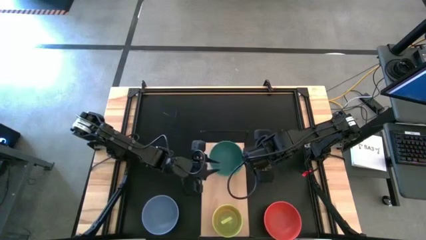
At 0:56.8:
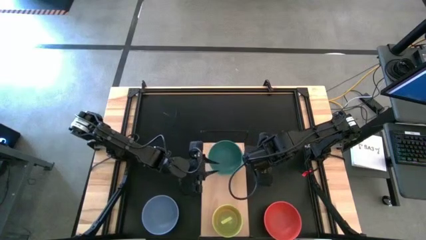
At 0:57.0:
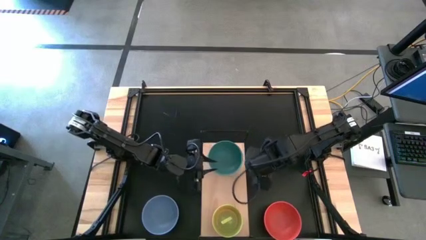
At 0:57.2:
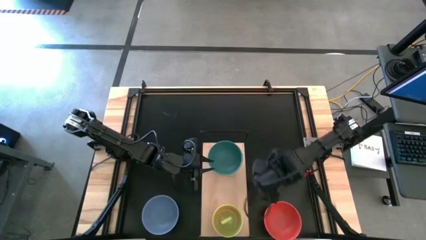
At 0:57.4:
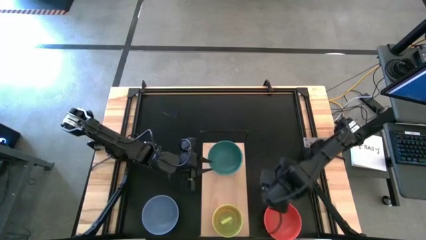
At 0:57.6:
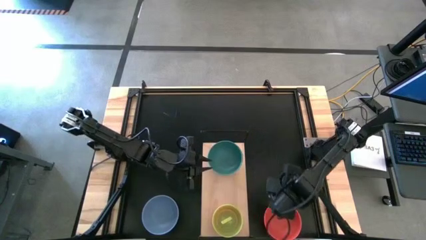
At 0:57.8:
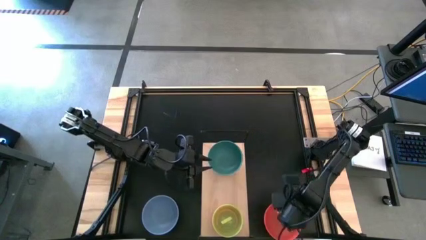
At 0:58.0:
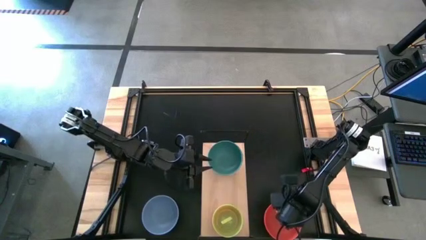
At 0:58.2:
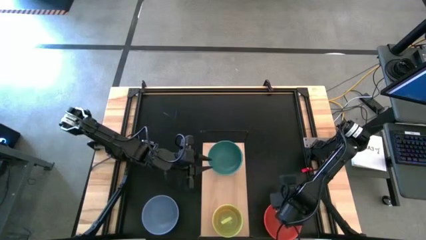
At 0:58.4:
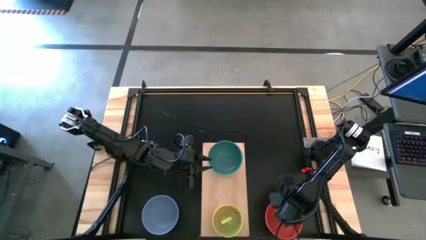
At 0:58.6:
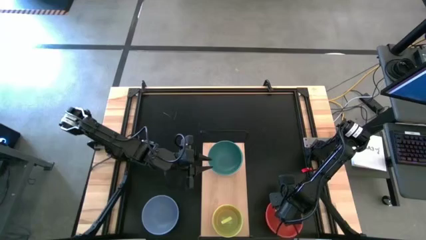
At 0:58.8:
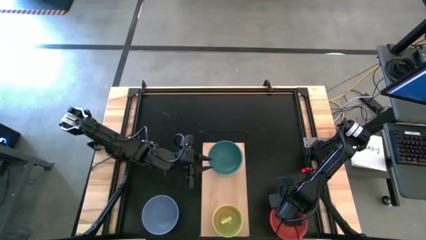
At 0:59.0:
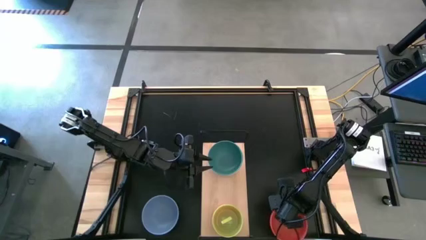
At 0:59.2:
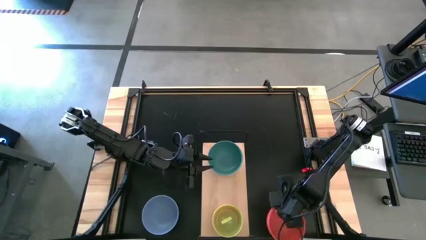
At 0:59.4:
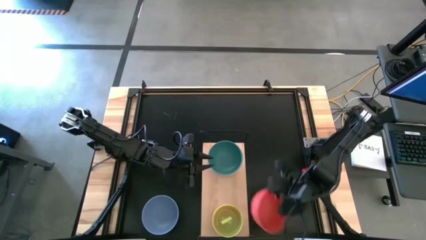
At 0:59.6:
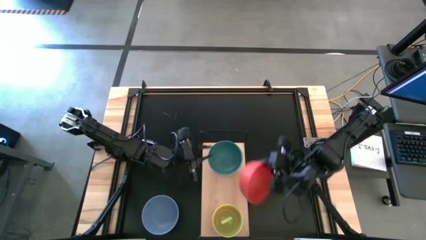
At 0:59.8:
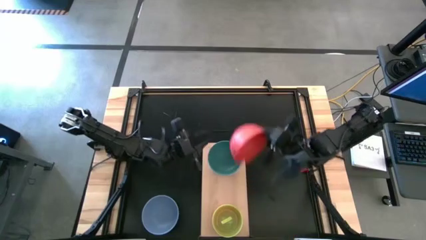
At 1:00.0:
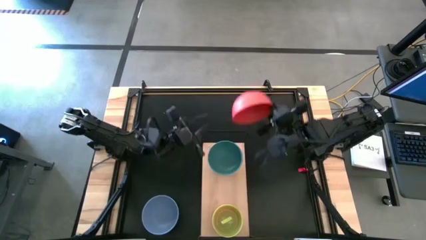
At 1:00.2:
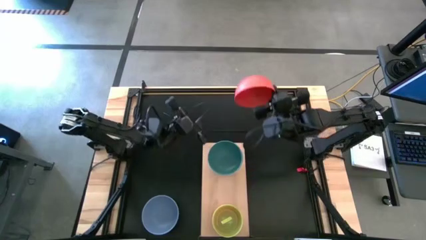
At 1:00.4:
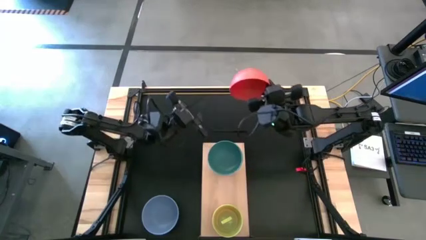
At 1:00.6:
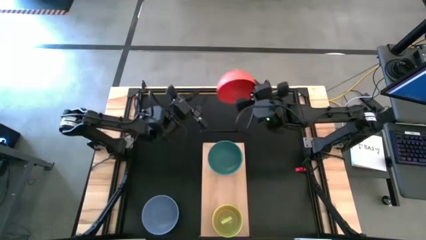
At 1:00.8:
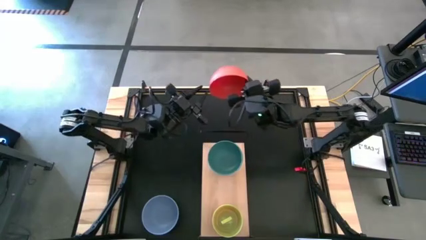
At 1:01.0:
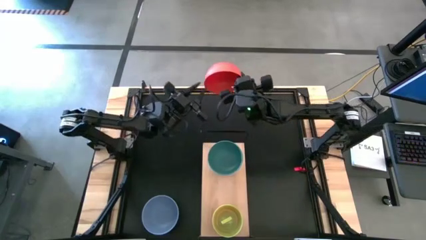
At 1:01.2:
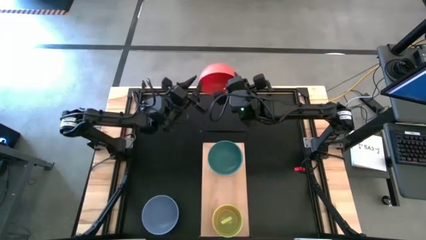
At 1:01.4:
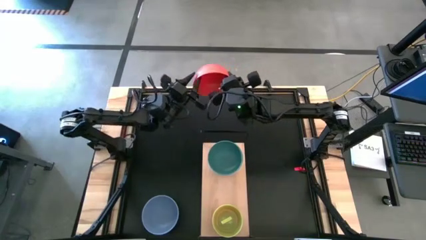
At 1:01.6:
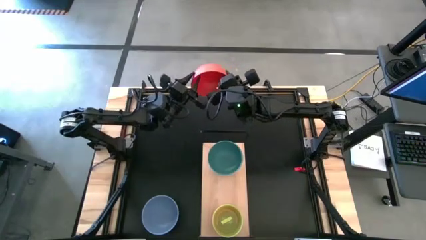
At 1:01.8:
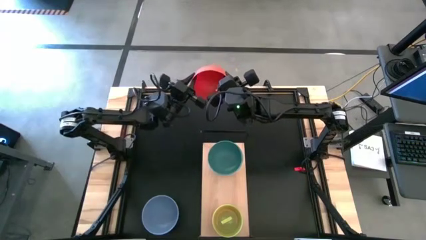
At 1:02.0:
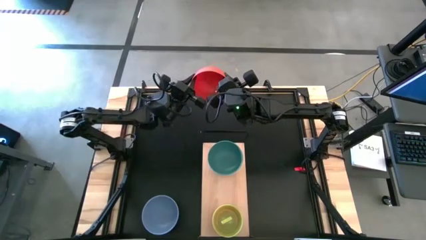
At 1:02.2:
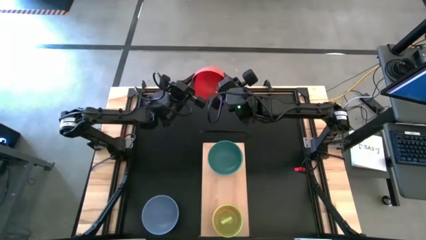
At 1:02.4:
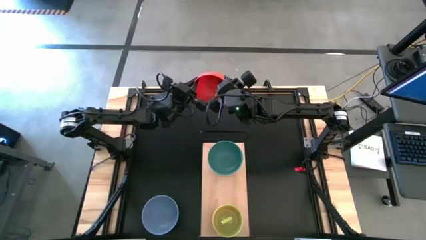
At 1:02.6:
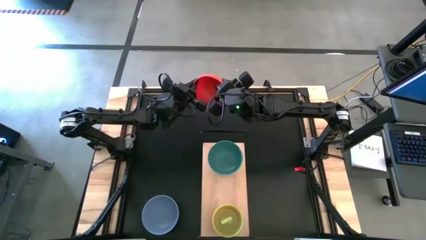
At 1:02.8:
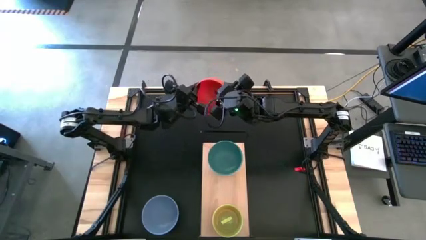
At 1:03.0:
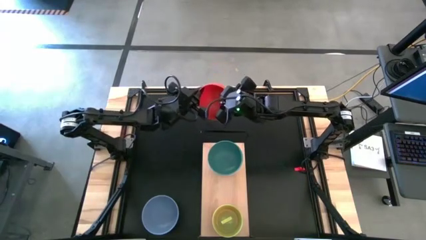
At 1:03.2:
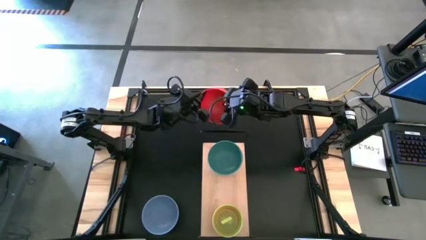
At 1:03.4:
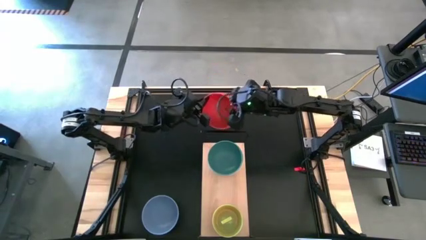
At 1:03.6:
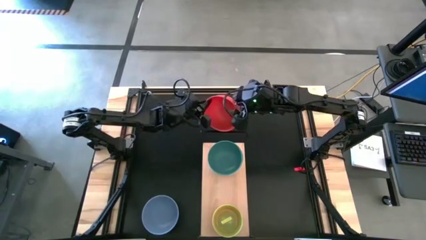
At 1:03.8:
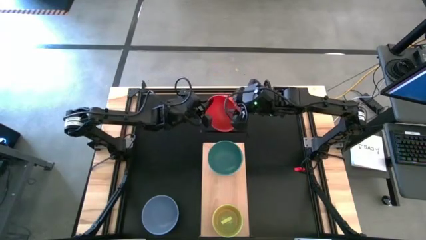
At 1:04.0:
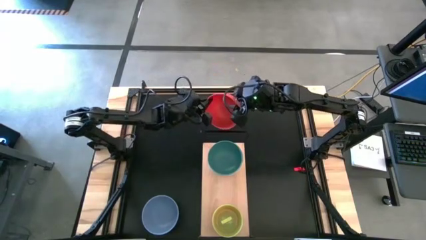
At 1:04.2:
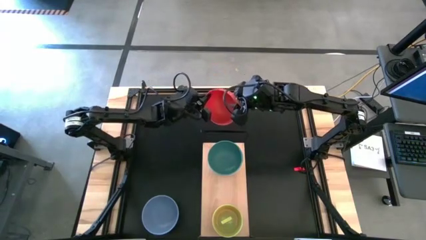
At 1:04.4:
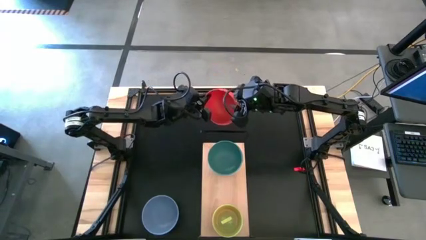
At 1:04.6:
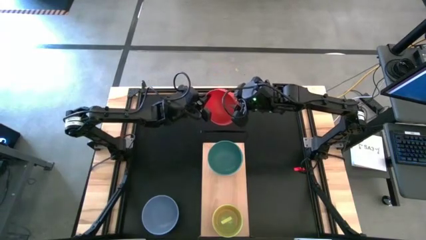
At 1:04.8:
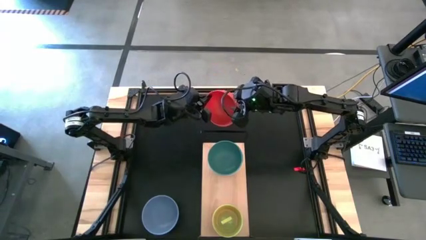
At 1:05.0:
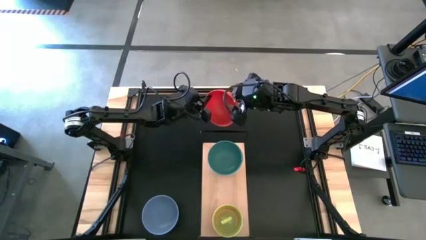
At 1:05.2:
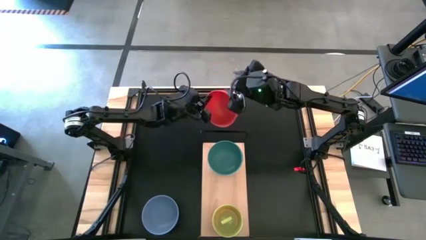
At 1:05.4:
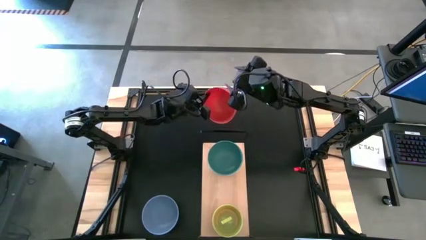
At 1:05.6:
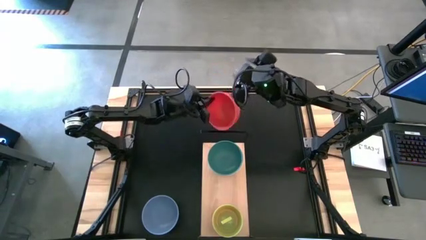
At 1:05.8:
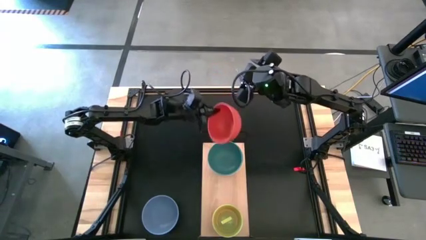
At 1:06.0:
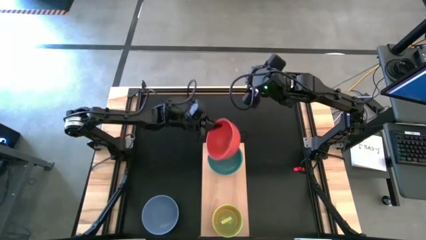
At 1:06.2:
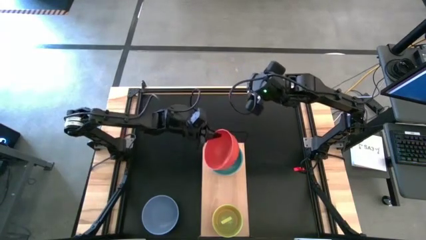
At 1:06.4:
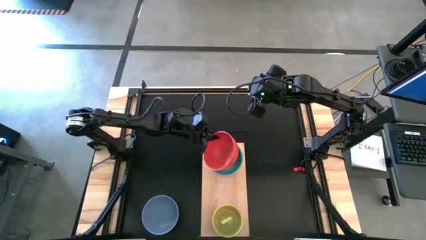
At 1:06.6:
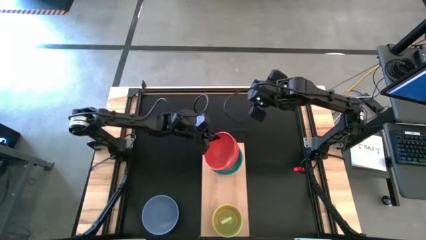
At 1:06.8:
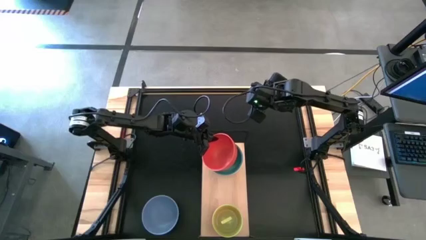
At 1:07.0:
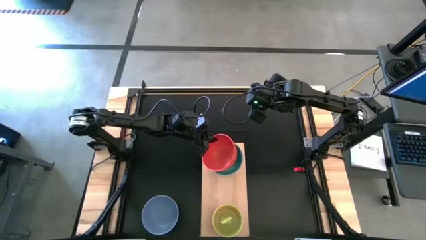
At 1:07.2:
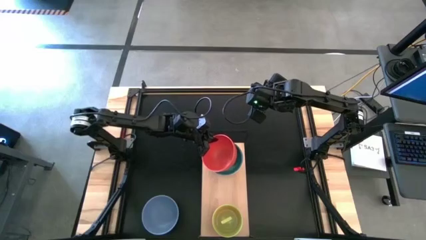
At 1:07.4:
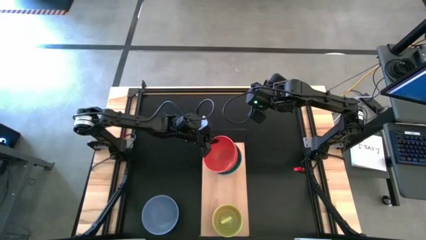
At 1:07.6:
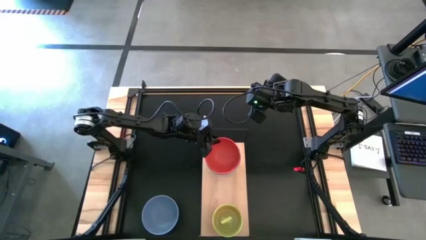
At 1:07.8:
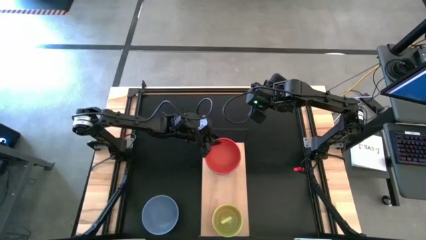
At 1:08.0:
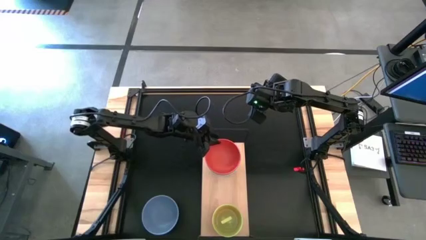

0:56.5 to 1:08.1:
Task: Place and stack bowls onto a shelf
Stack the large orange bowl on top of the large green bowl on the shelf
